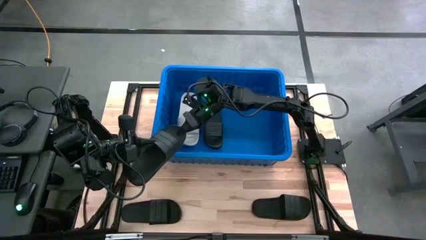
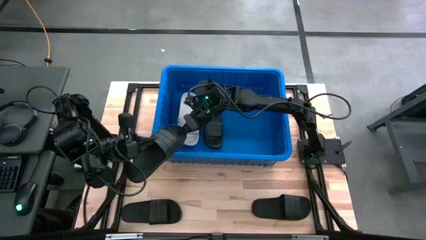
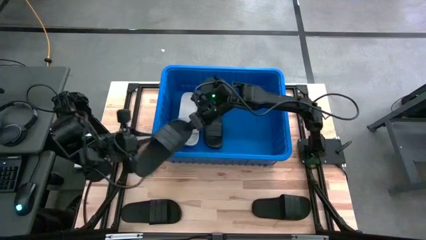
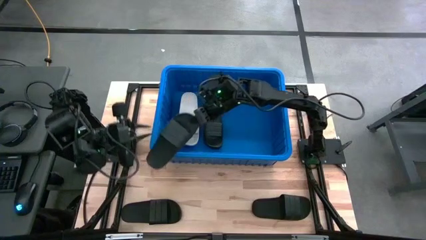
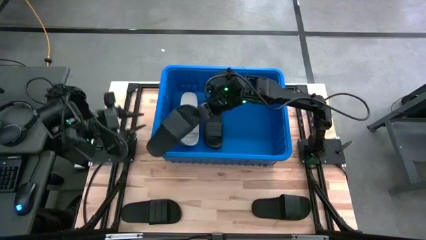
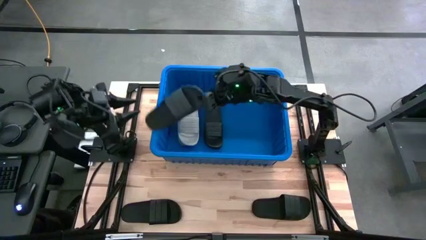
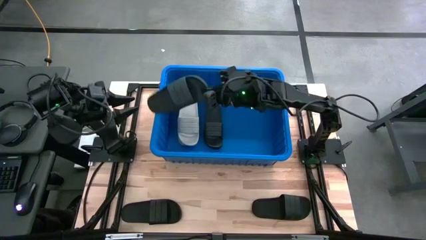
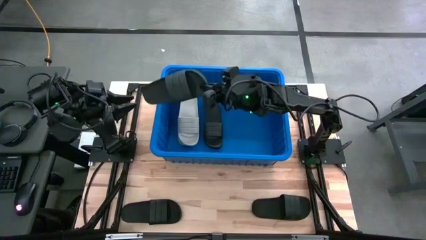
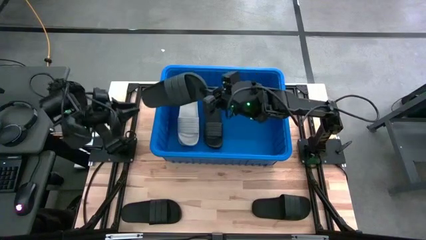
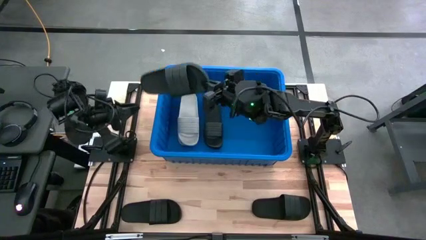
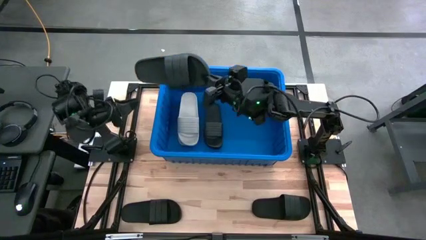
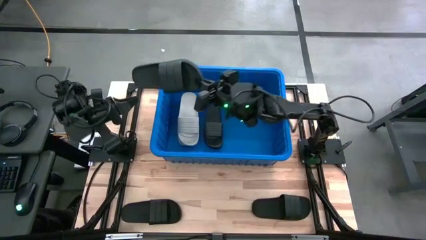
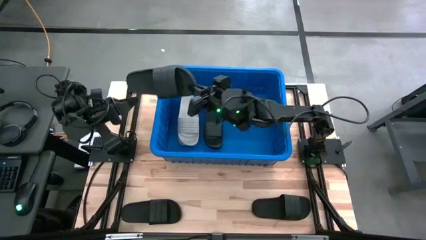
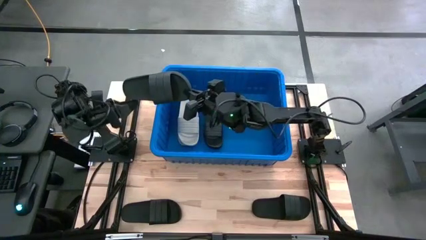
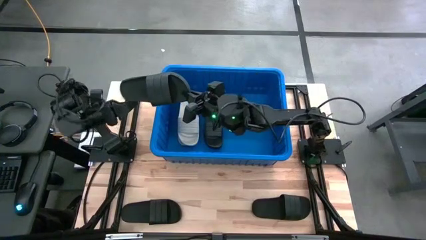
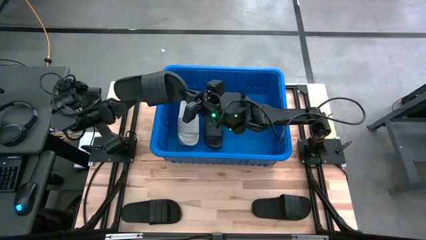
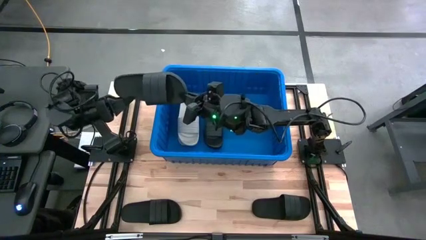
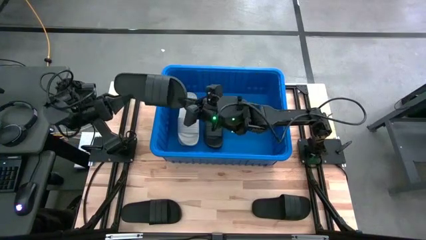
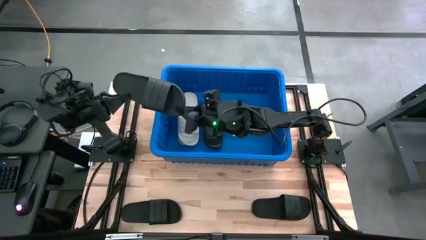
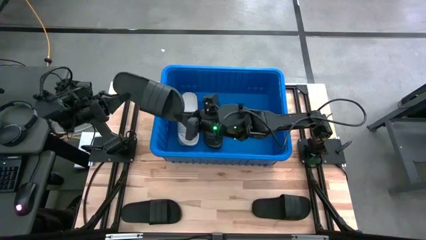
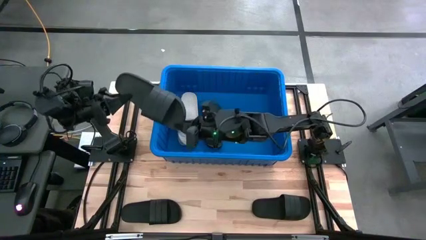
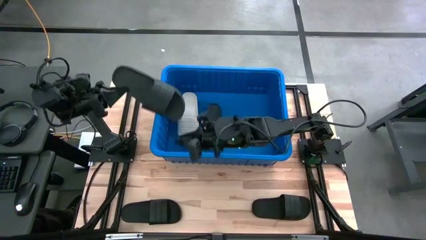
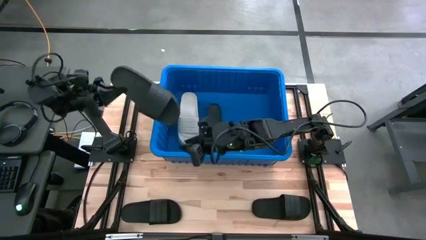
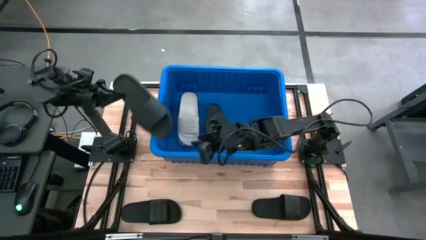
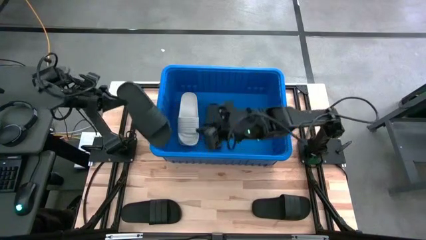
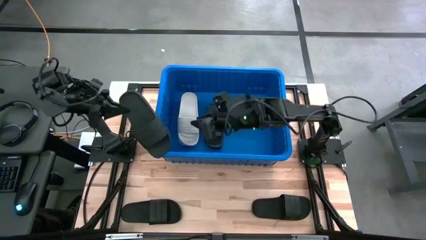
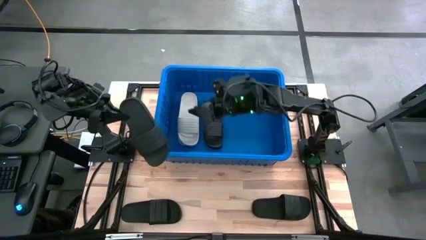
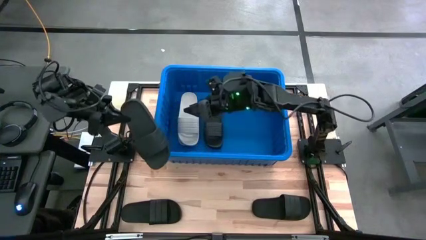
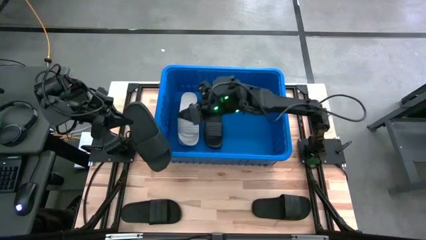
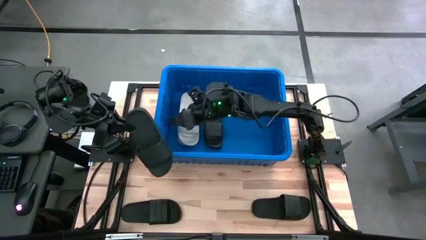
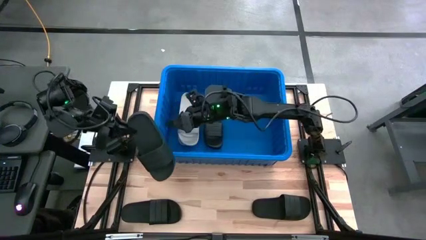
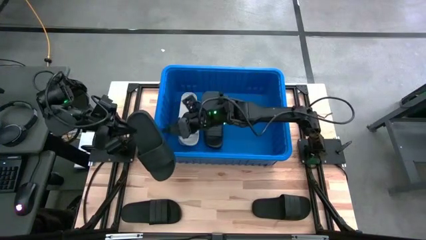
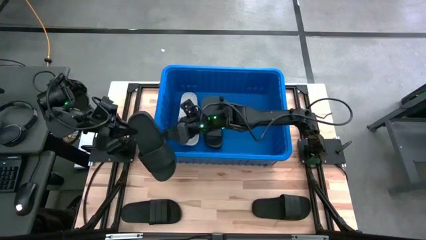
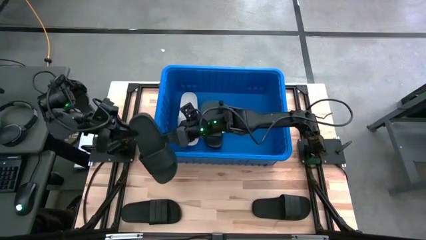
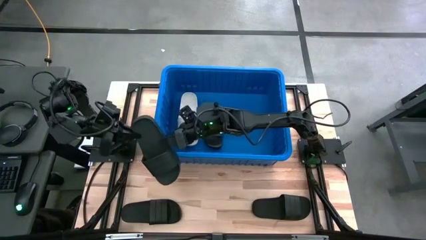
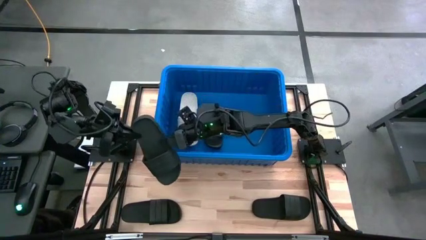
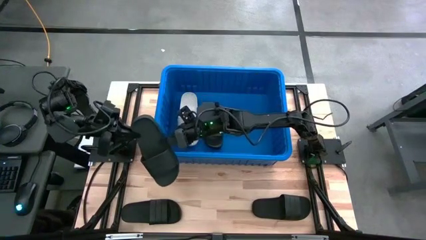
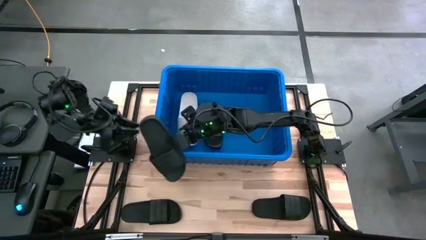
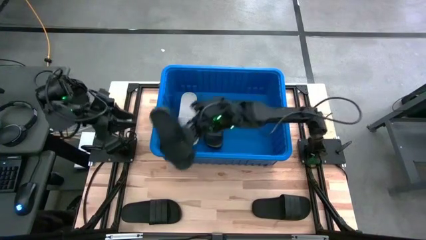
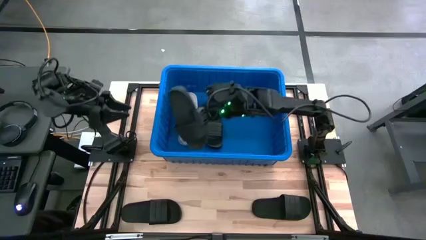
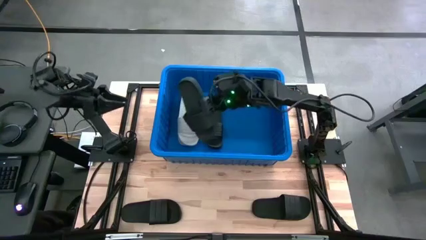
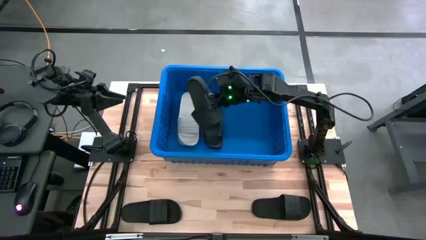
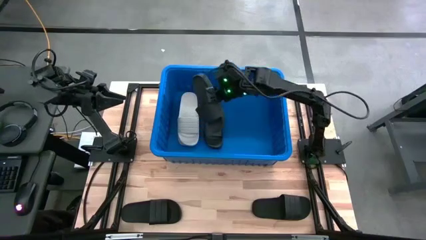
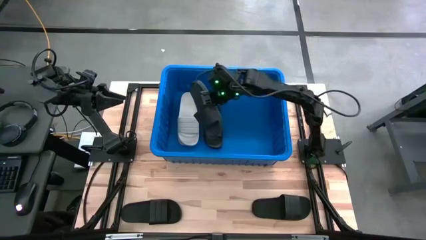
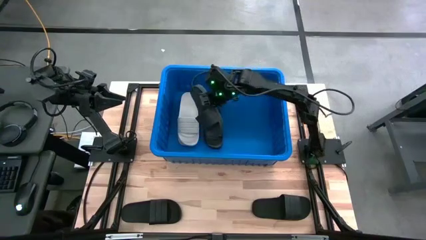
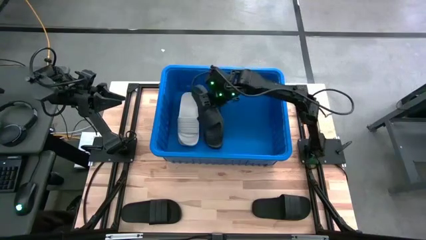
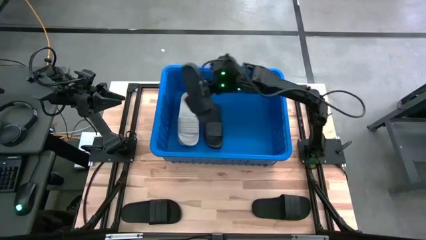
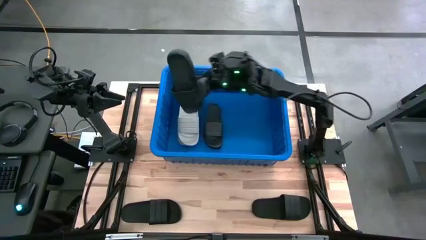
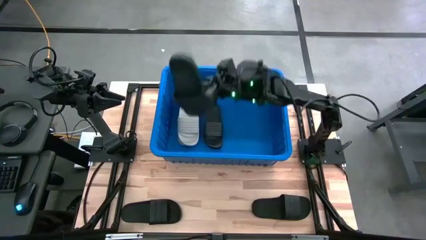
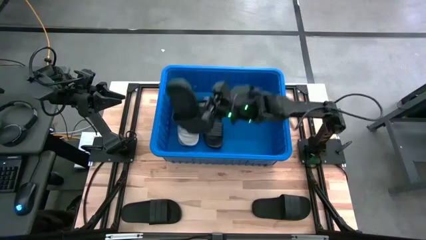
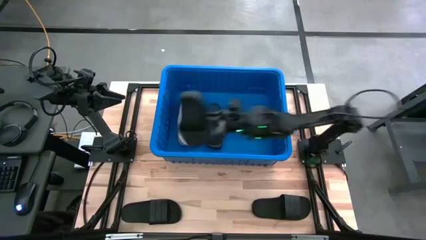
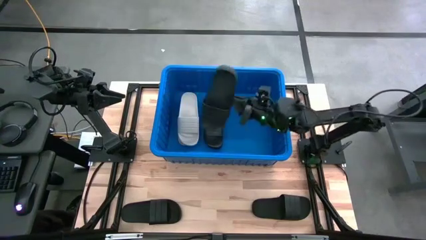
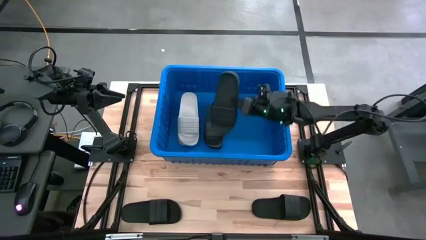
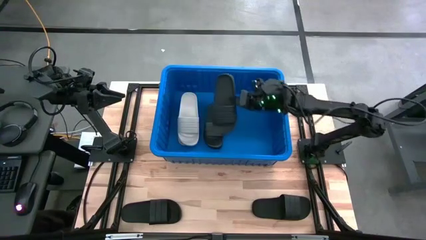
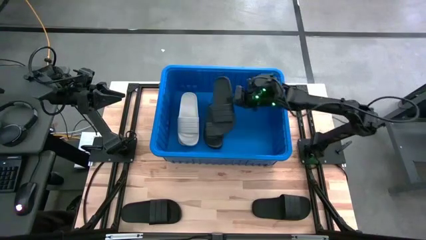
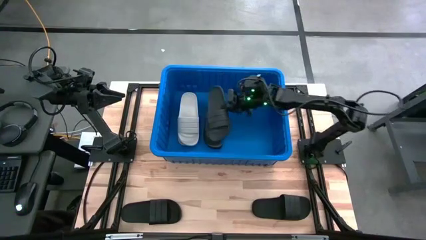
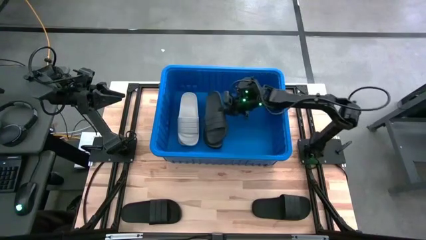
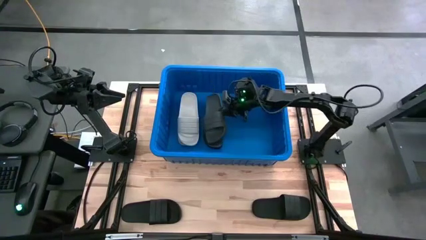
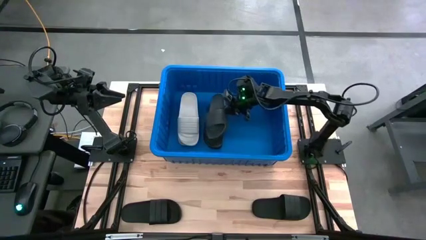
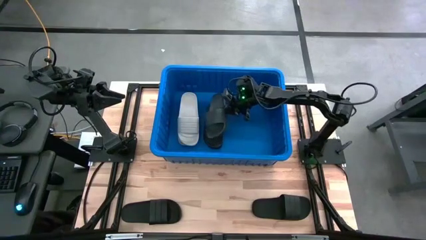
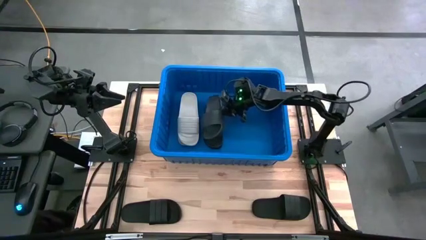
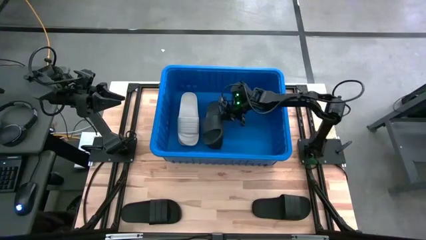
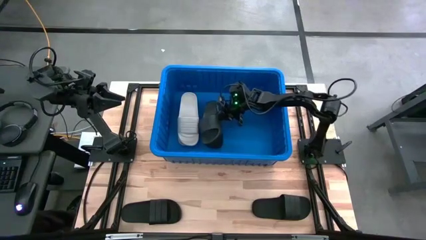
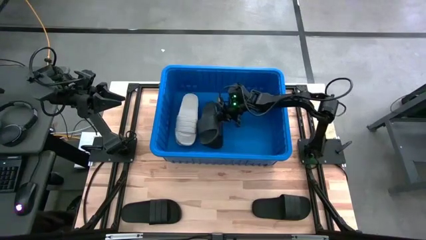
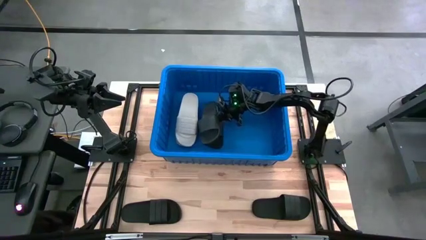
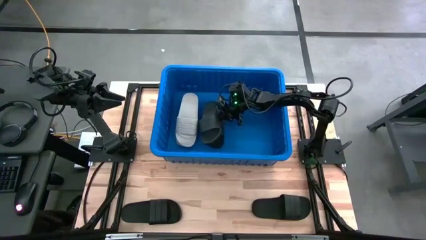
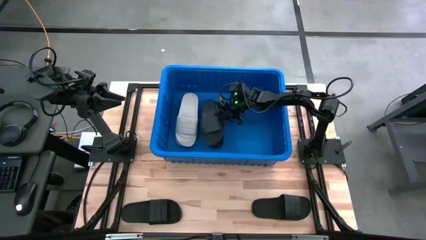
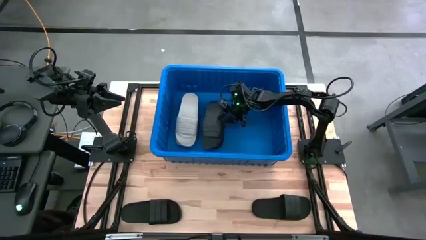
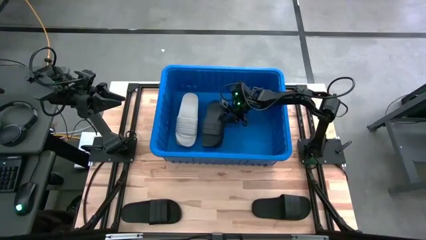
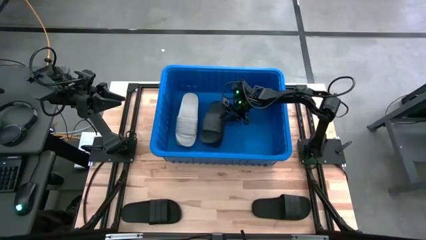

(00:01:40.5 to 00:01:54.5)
Task: Pick and place slides into bin
Stack the black slide on top of the black slide in the blue bin
